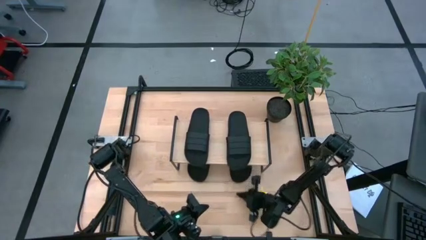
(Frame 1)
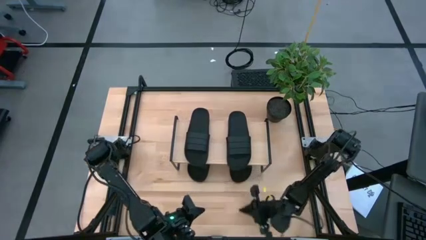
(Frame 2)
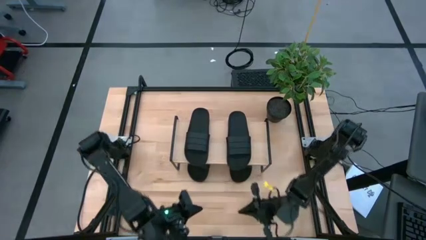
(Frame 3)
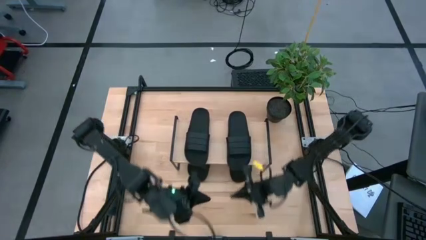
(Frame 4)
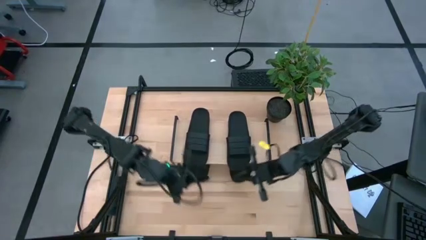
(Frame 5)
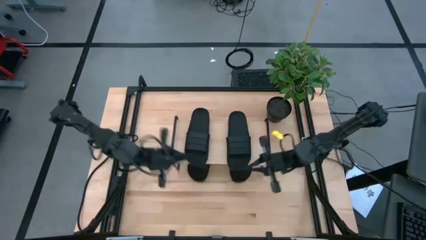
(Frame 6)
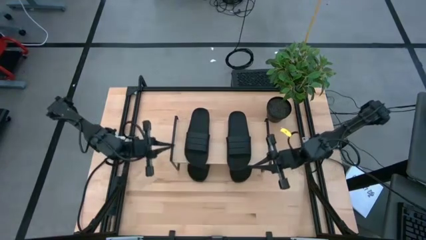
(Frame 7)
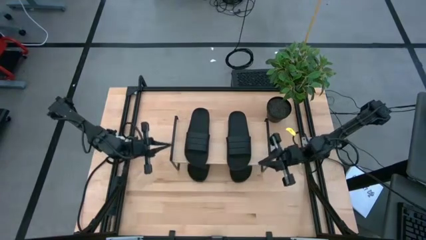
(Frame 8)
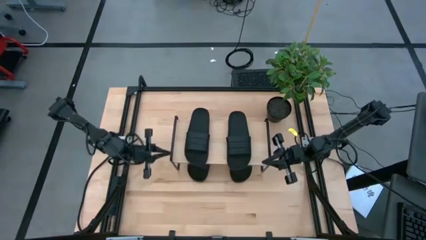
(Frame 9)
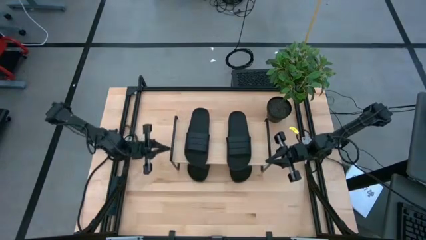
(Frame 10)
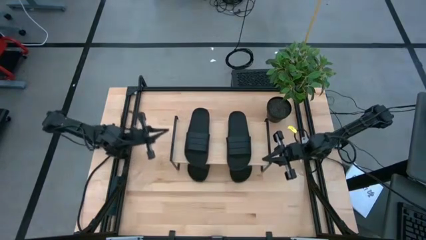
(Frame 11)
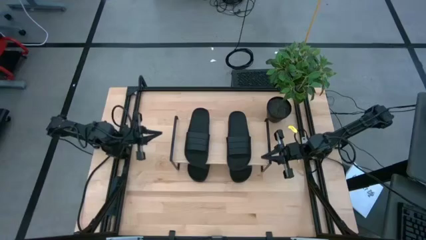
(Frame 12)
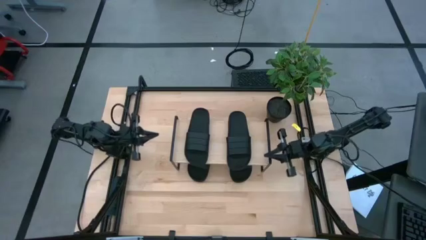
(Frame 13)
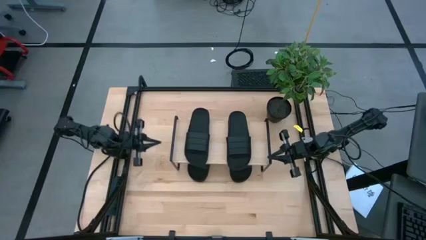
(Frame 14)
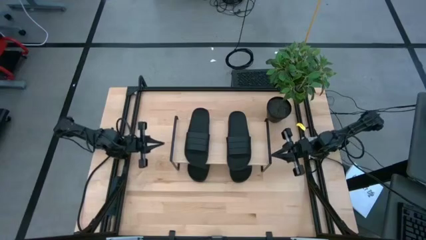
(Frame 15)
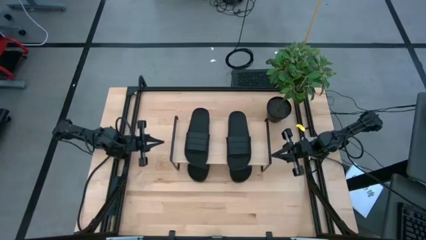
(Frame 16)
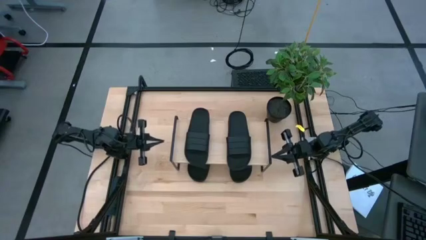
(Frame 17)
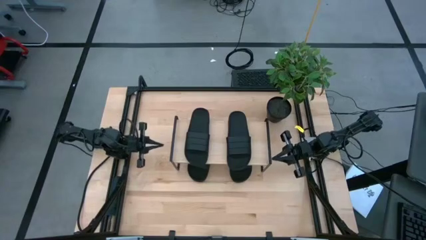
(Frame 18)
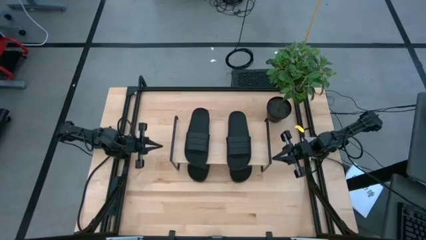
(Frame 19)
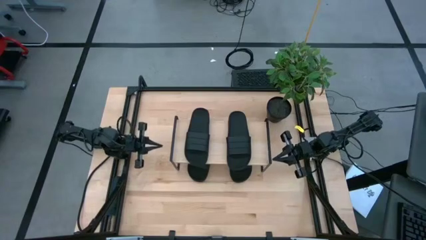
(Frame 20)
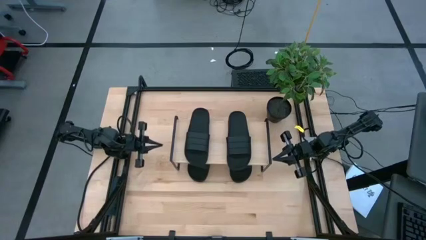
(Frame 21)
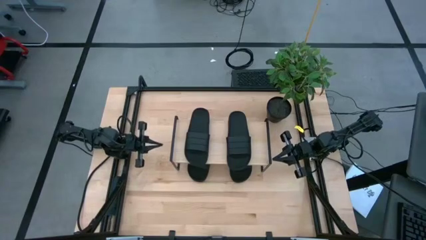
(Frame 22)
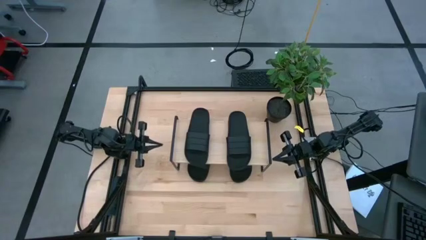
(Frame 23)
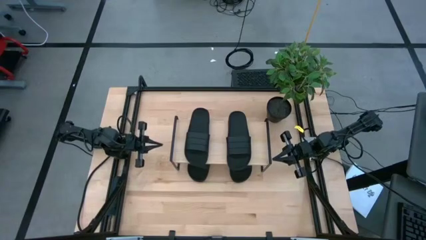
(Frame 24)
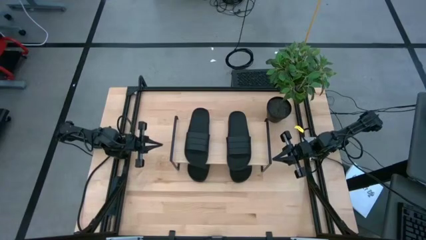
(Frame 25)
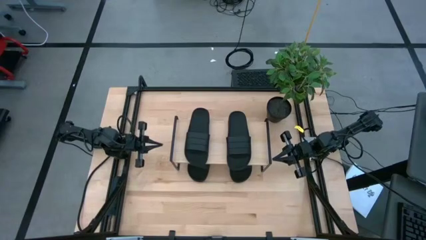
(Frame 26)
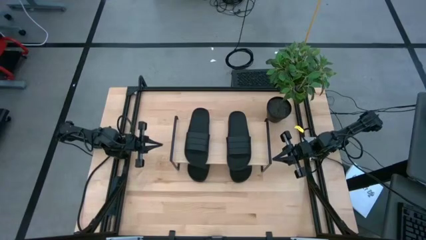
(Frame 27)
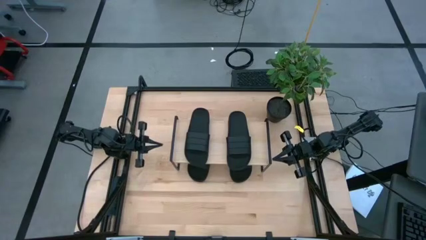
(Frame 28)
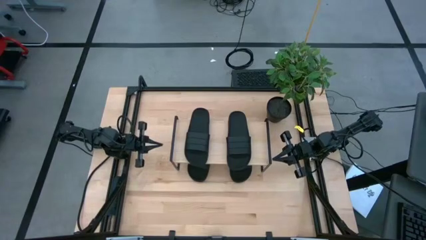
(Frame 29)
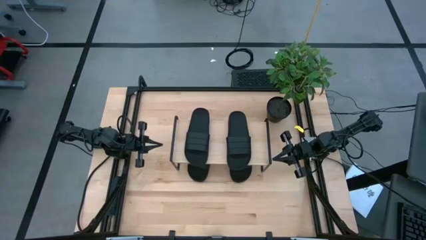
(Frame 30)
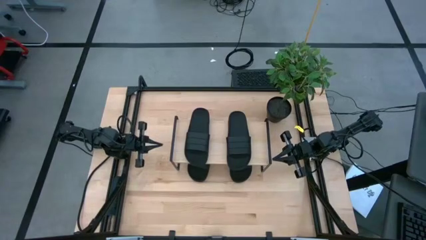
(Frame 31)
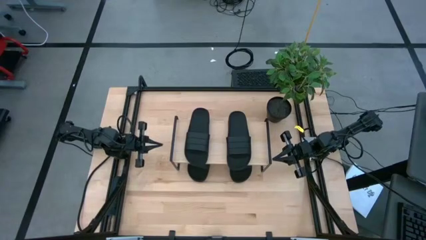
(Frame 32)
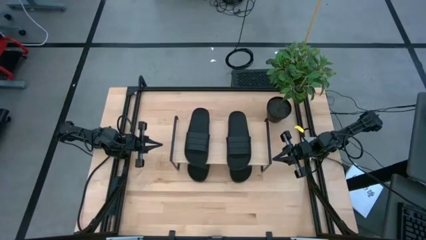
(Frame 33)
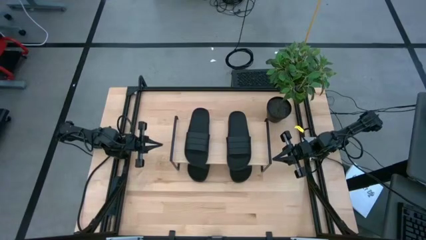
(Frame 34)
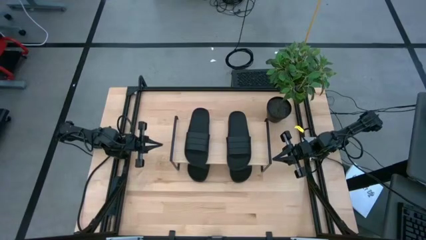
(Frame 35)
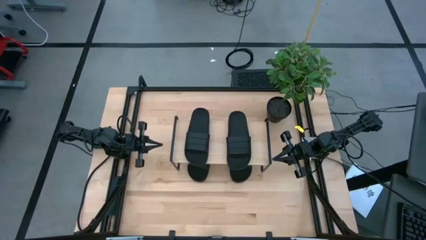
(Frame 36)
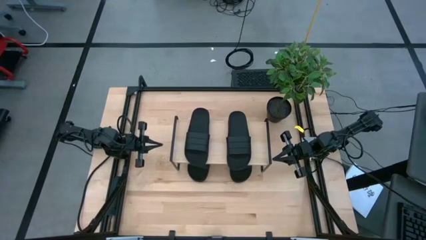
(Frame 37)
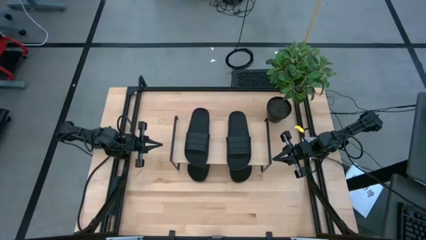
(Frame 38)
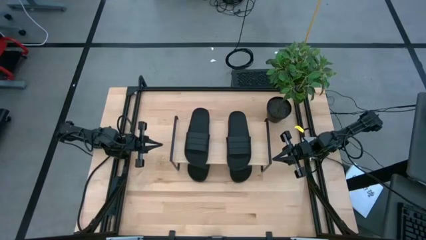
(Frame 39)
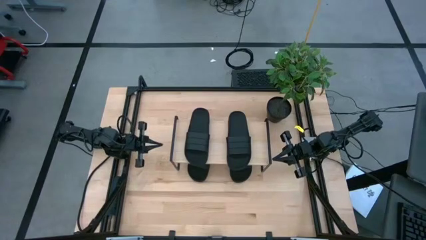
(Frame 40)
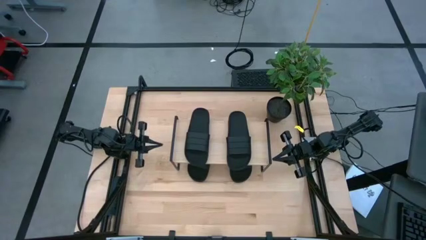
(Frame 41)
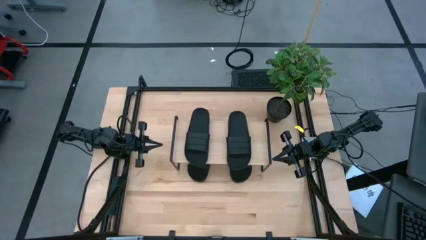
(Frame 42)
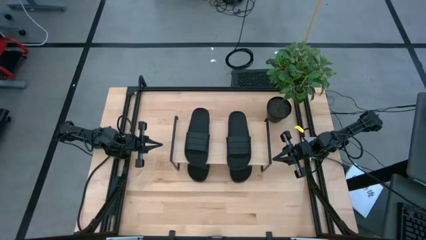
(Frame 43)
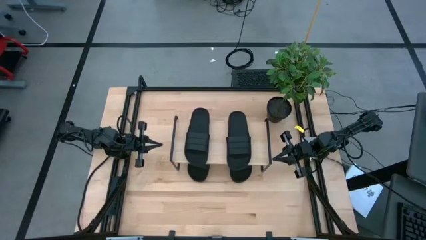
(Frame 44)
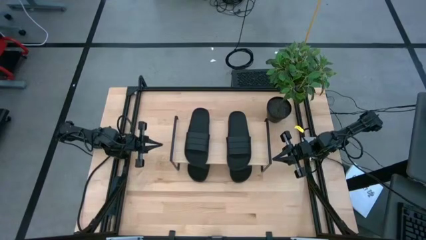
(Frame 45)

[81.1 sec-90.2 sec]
Task: Pick and place slides into the shelf
Return to Home Position

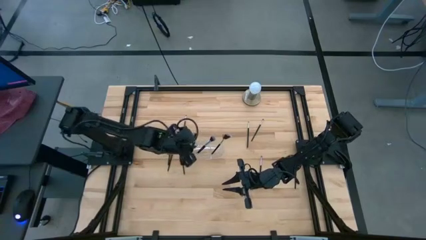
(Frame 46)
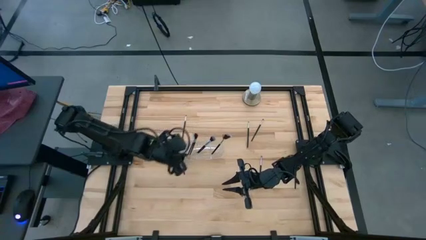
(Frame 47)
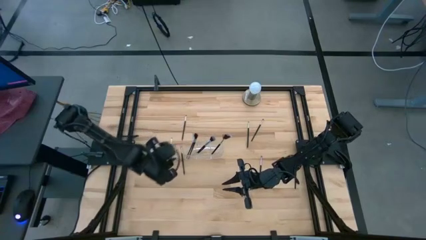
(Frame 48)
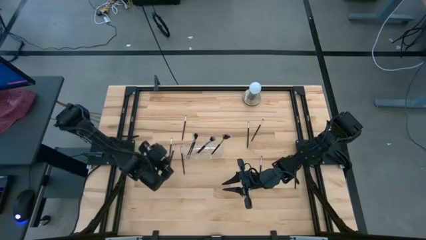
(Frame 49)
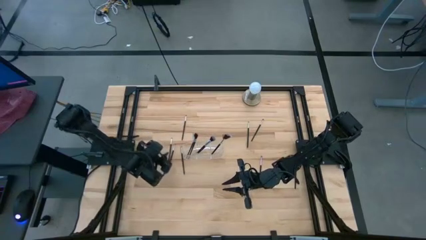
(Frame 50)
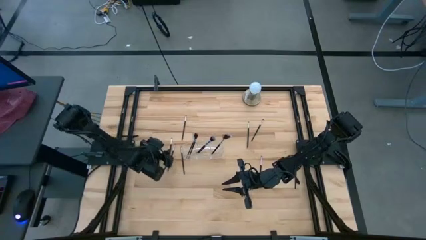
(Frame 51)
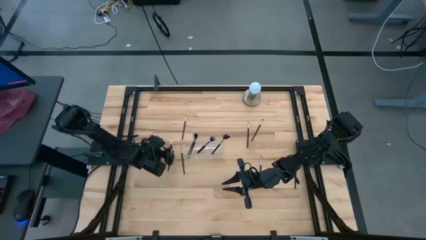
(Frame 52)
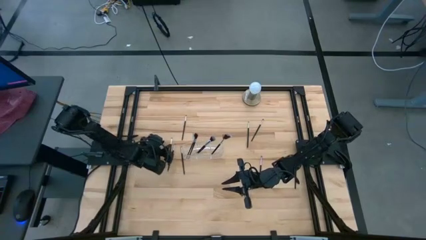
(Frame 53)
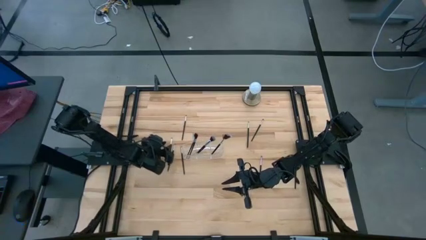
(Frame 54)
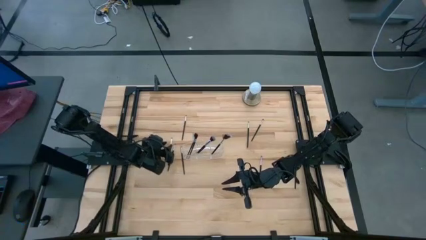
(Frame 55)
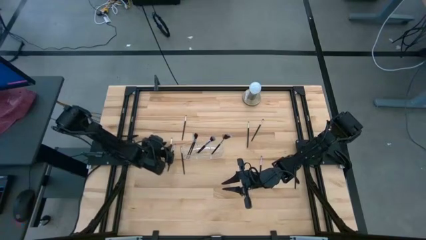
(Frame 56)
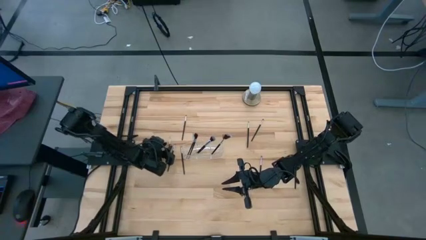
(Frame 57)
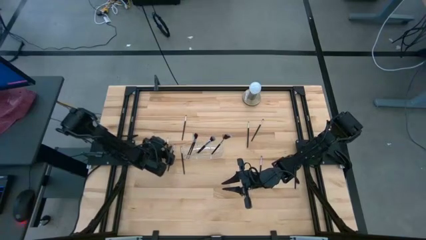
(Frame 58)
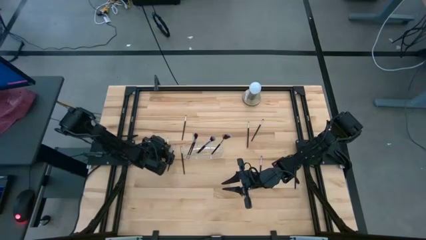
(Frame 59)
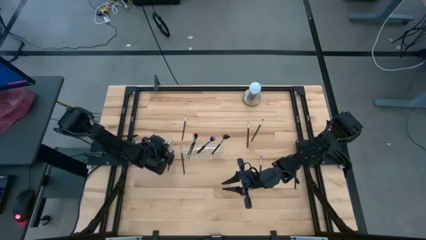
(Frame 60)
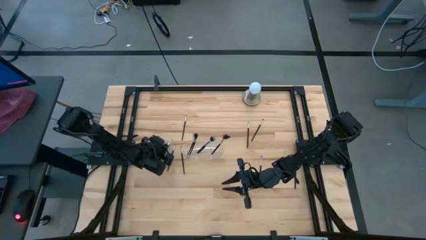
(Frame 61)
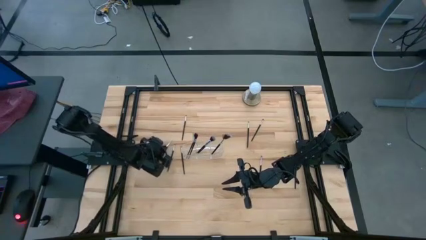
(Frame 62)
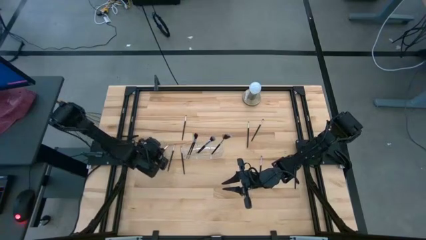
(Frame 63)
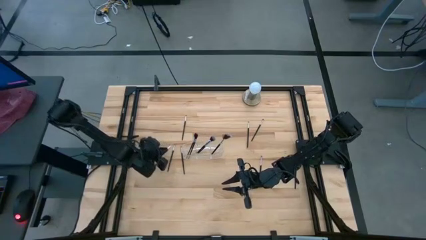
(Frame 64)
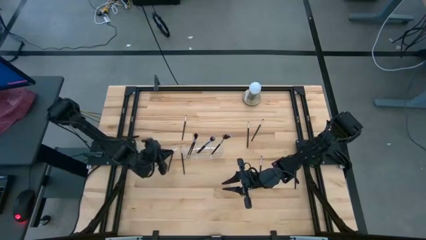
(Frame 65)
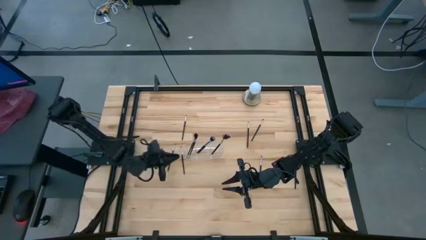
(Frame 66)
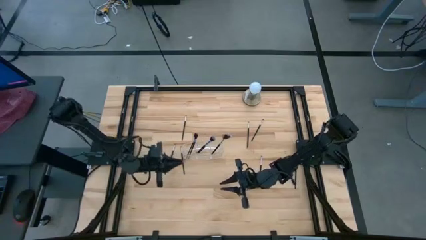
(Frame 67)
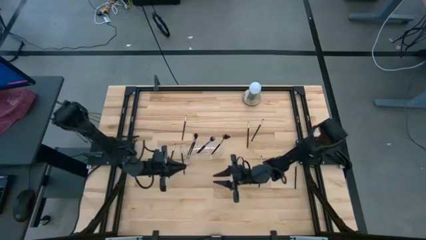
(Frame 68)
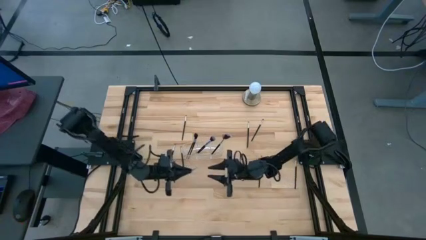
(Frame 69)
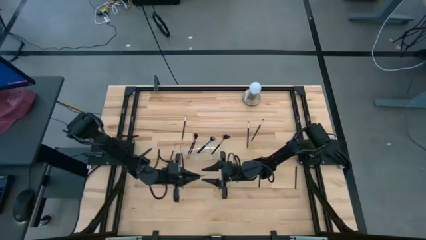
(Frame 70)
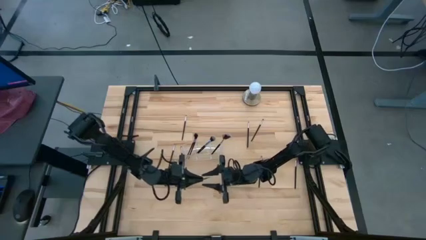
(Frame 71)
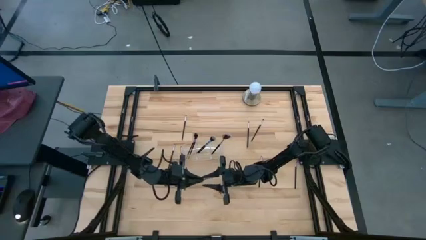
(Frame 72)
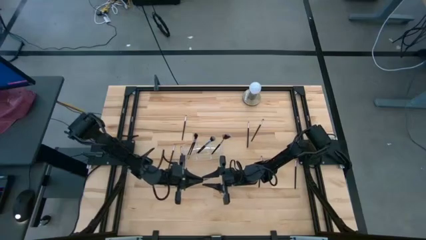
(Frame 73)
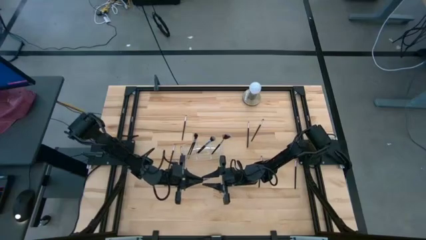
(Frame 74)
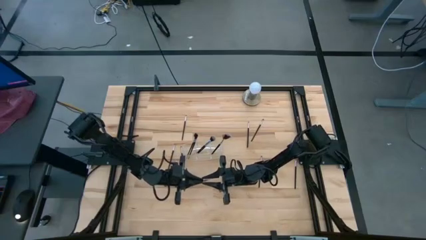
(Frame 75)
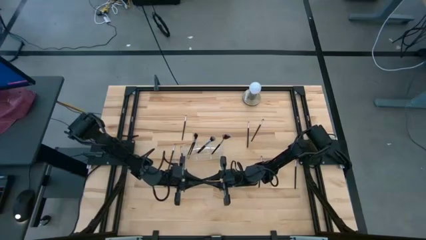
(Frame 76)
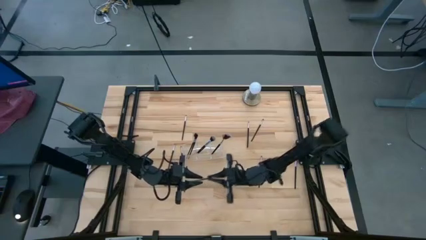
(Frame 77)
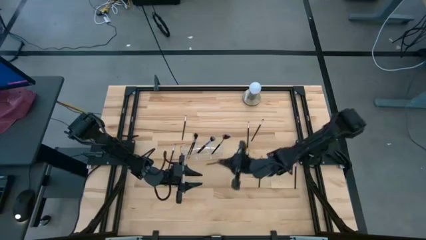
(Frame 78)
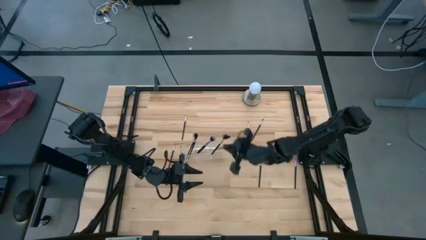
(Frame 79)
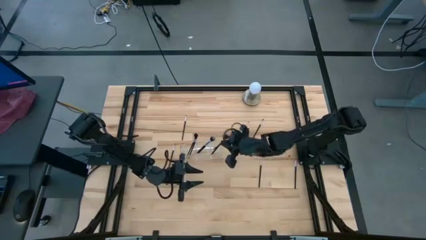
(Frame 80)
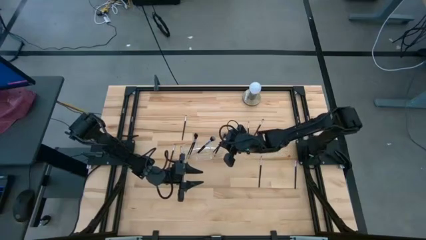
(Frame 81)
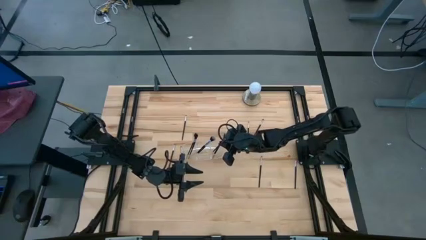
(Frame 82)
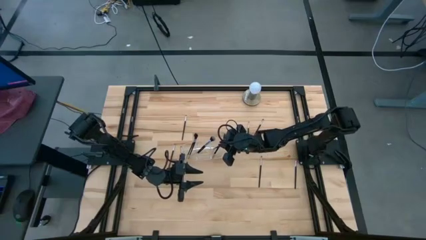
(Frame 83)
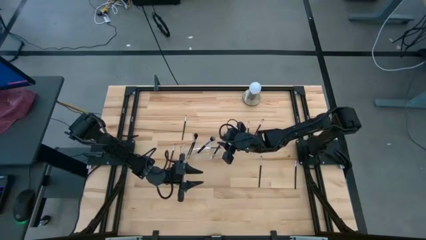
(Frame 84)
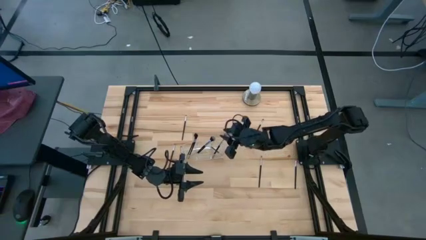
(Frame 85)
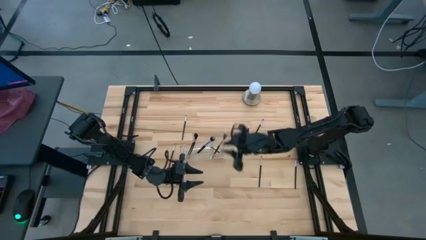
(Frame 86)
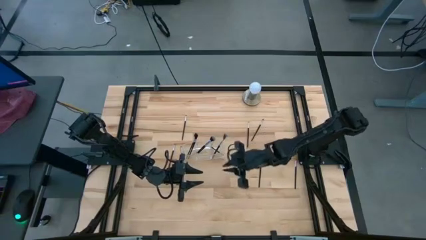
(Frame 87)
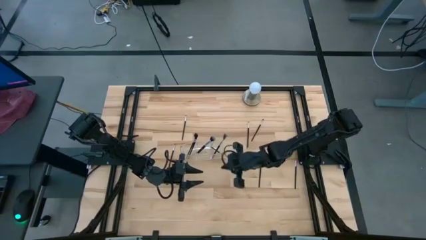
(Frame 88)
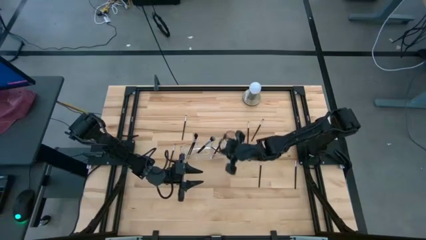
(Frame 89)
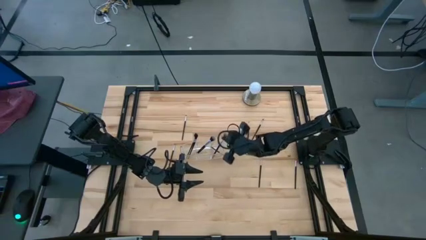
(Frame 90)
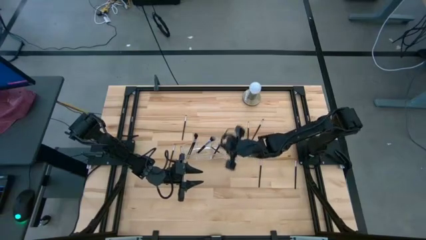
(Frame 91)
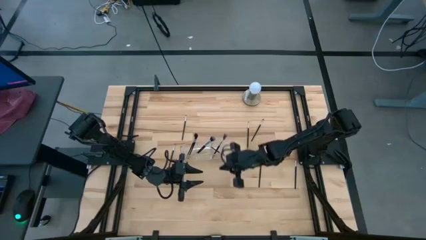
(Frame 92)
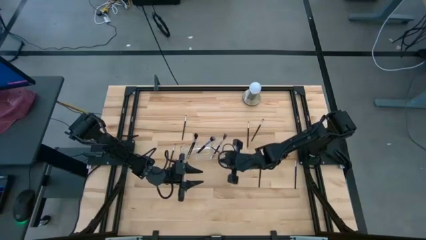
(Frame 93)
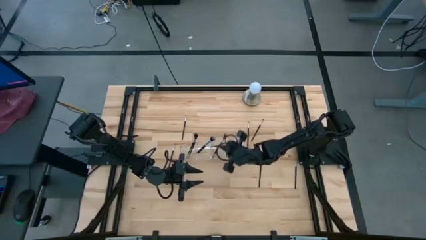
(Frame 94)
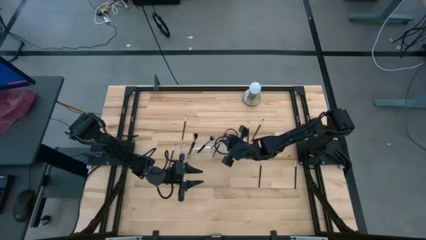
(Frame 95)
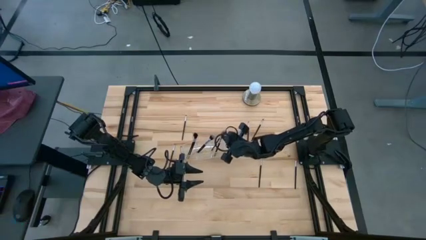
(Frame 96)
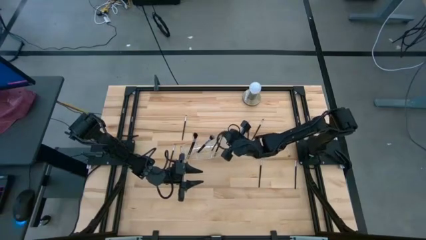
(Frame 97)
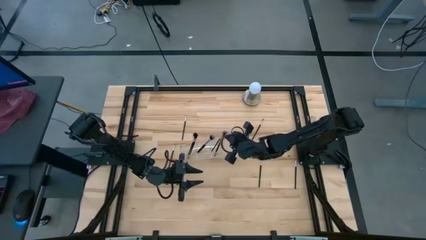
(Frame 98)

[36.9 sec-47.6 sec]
Task: Put items in baskets/containers
Put the eyeshadow brush into the transparent organizer
